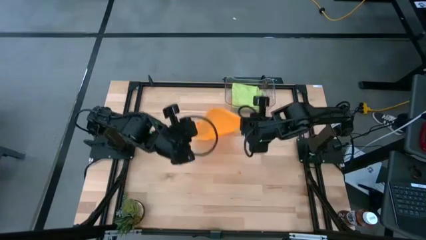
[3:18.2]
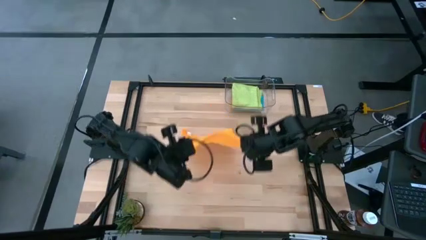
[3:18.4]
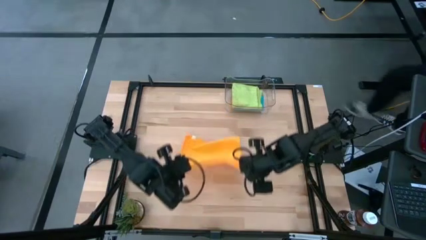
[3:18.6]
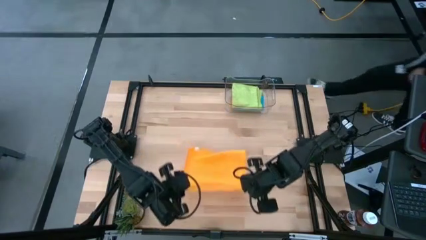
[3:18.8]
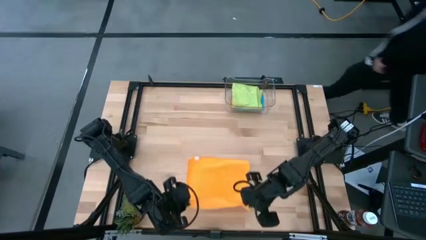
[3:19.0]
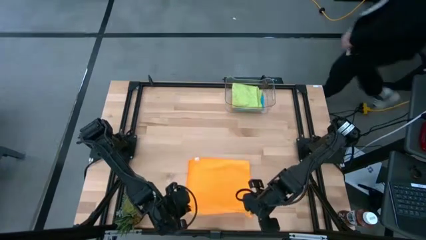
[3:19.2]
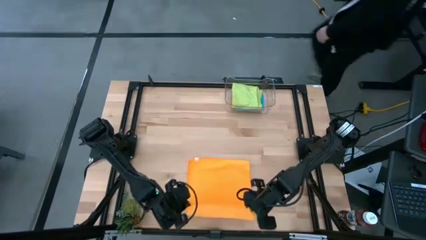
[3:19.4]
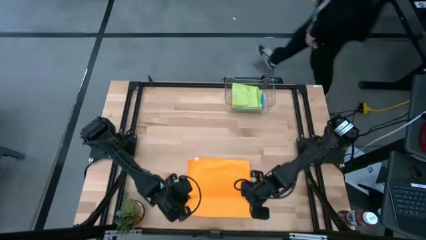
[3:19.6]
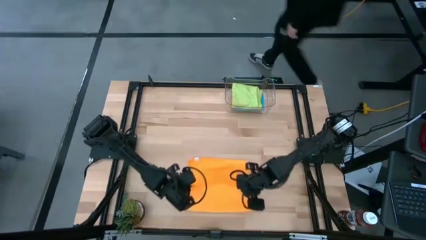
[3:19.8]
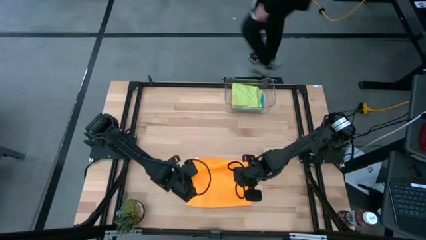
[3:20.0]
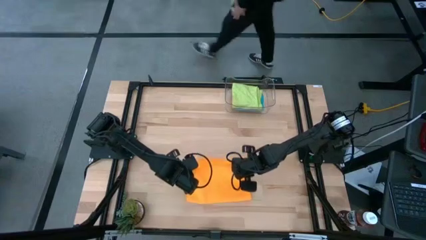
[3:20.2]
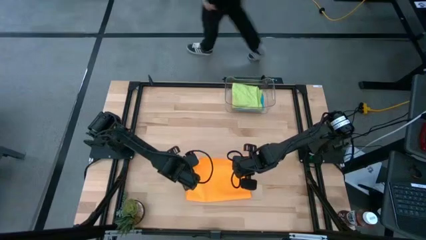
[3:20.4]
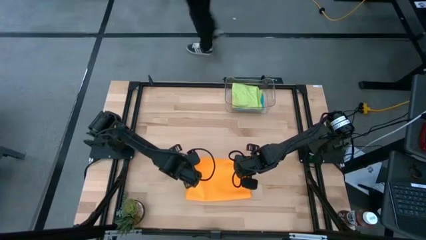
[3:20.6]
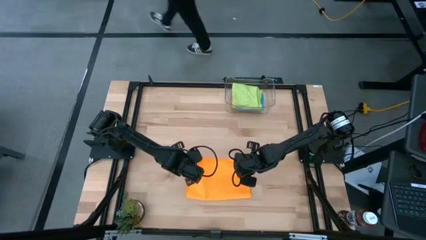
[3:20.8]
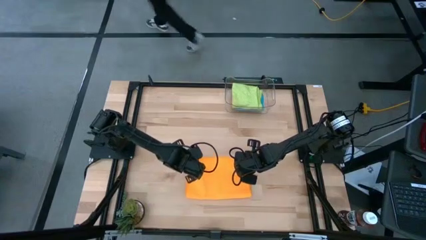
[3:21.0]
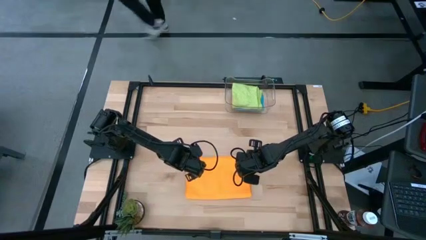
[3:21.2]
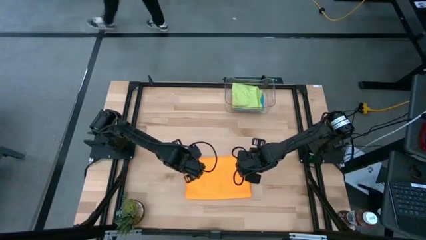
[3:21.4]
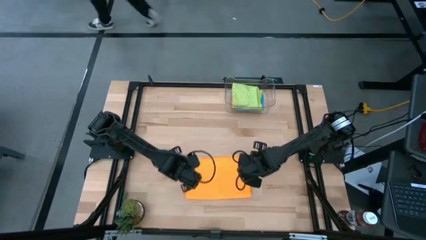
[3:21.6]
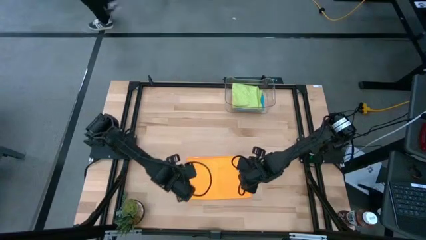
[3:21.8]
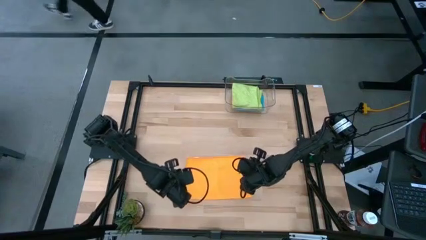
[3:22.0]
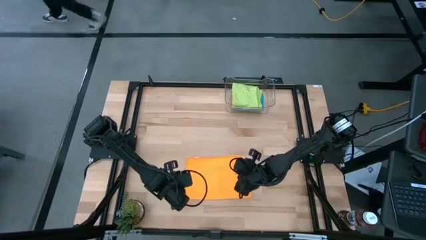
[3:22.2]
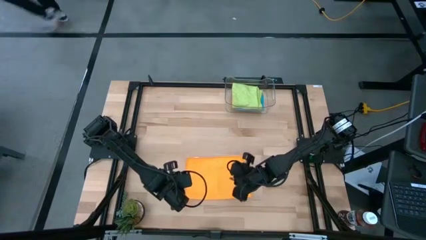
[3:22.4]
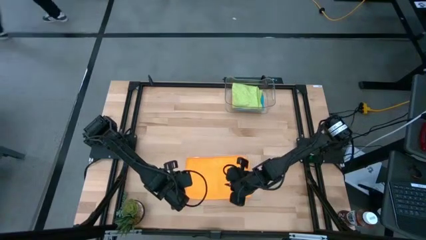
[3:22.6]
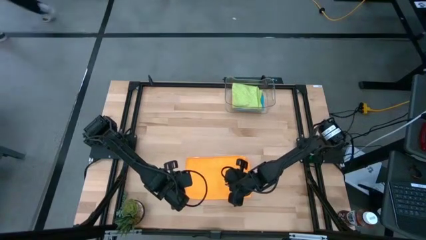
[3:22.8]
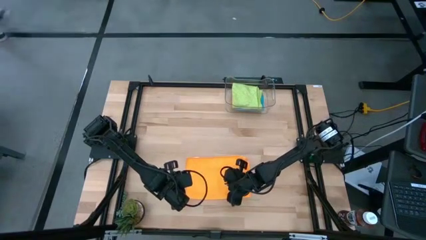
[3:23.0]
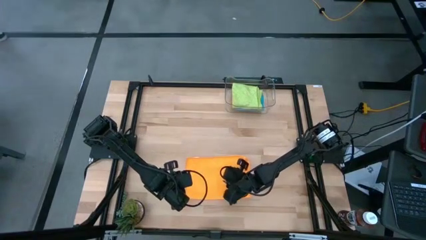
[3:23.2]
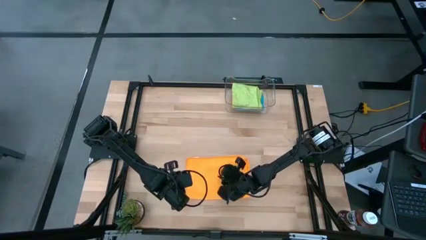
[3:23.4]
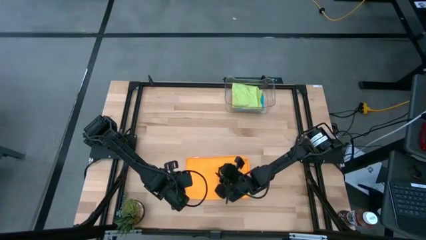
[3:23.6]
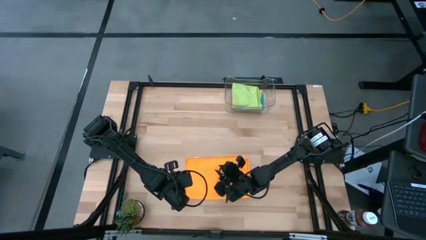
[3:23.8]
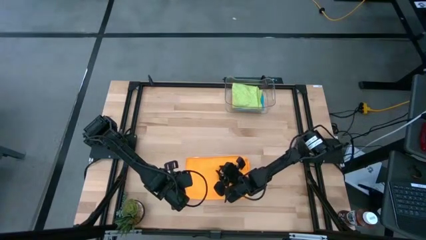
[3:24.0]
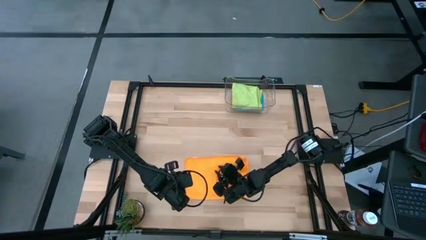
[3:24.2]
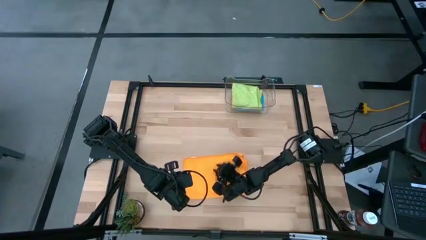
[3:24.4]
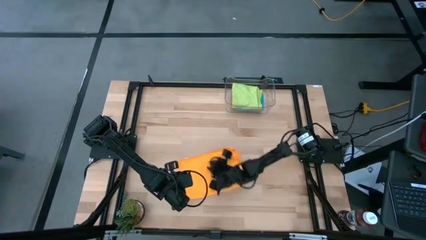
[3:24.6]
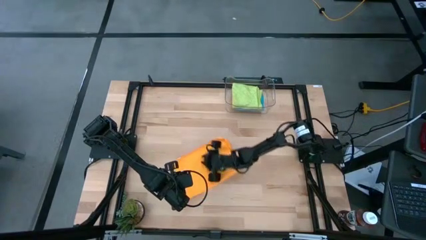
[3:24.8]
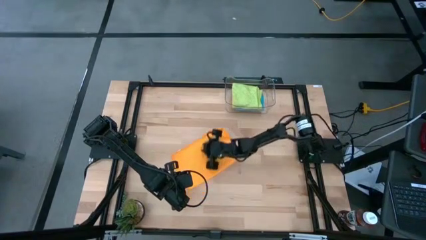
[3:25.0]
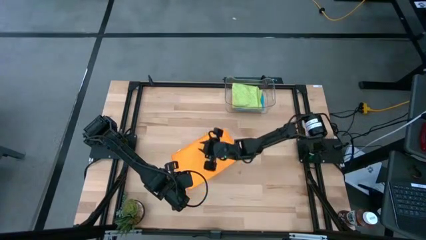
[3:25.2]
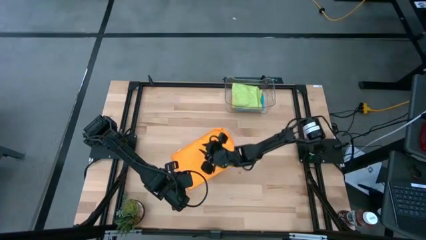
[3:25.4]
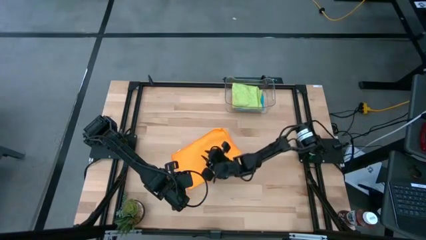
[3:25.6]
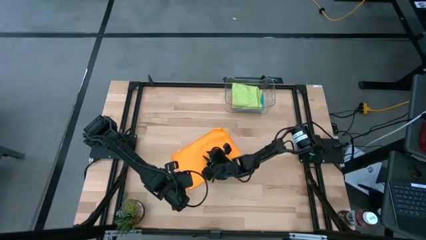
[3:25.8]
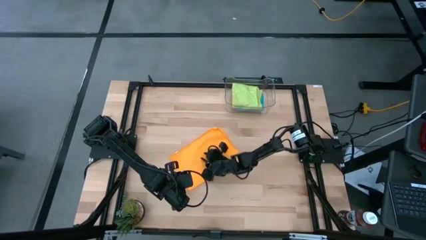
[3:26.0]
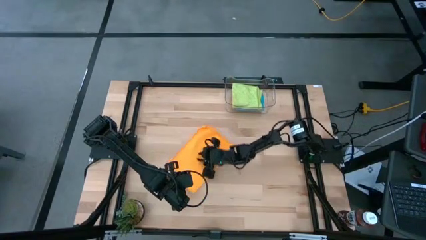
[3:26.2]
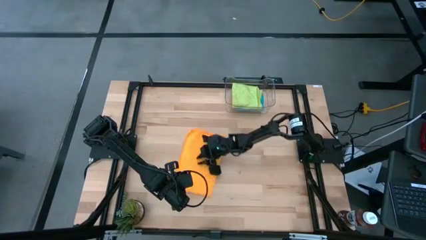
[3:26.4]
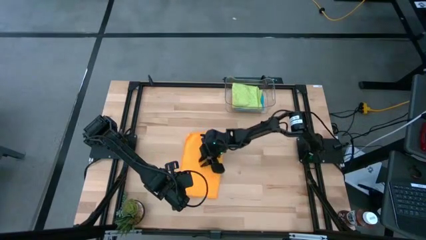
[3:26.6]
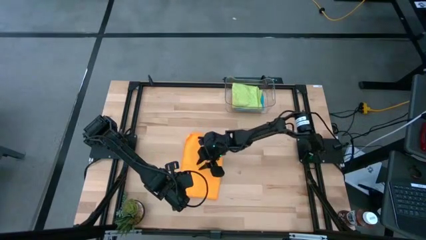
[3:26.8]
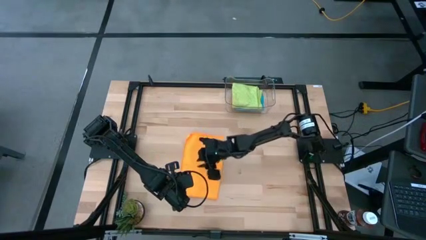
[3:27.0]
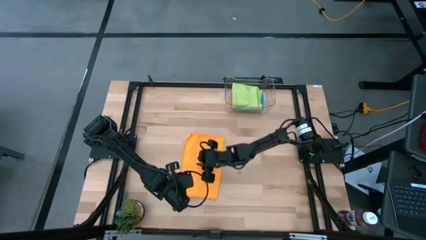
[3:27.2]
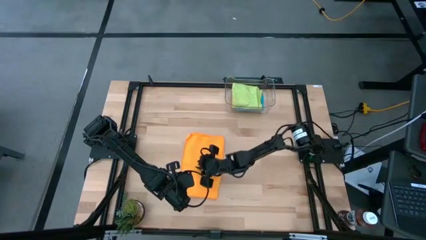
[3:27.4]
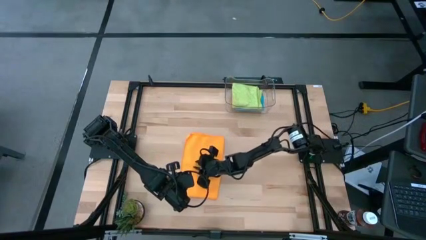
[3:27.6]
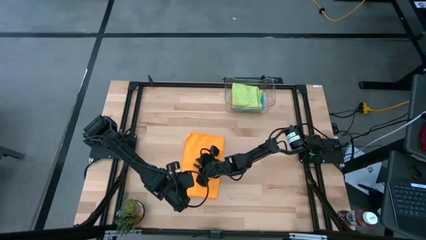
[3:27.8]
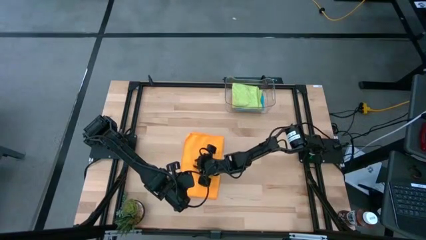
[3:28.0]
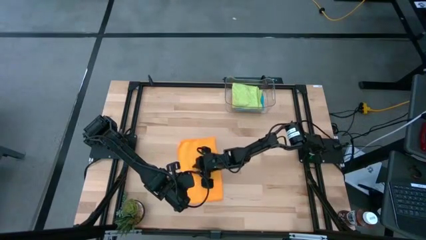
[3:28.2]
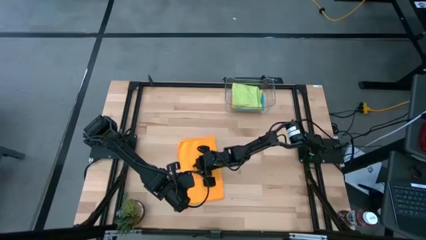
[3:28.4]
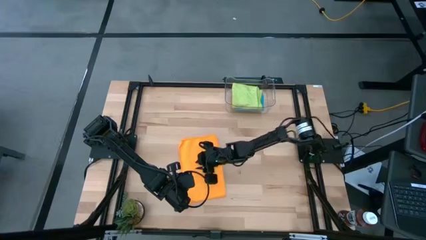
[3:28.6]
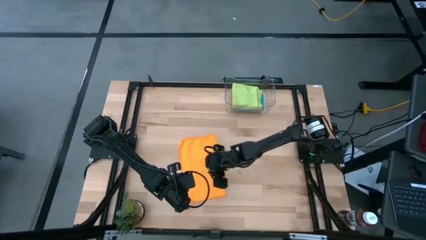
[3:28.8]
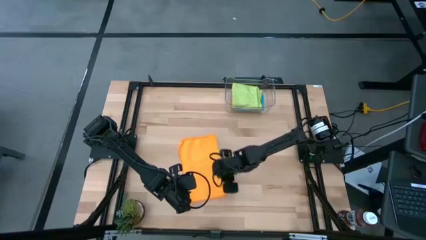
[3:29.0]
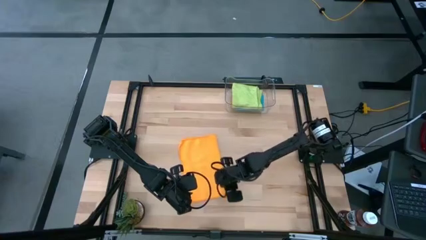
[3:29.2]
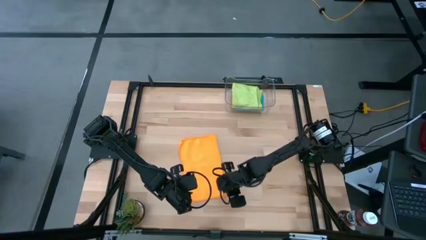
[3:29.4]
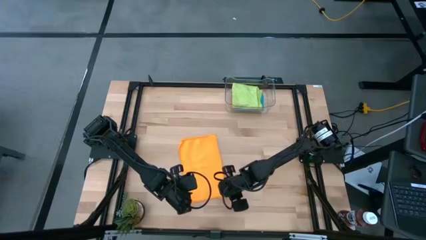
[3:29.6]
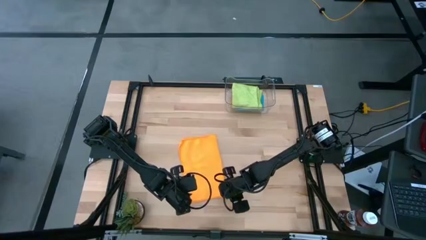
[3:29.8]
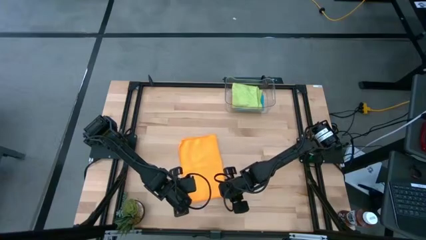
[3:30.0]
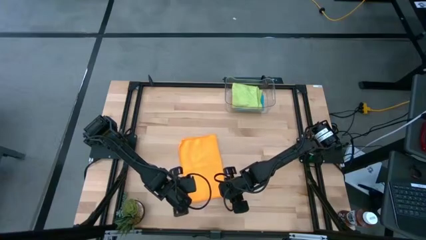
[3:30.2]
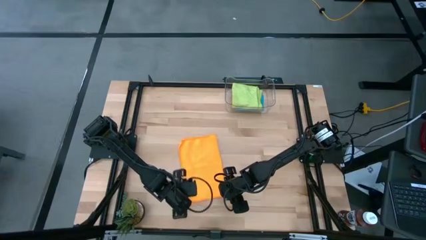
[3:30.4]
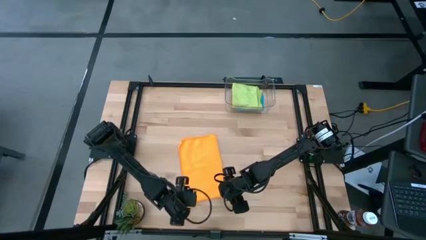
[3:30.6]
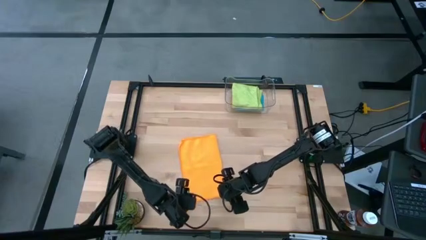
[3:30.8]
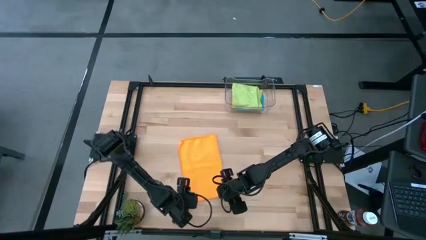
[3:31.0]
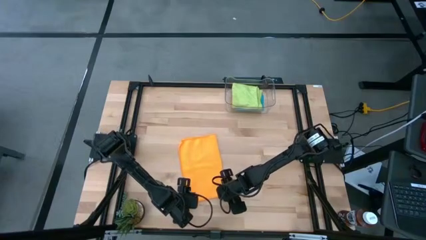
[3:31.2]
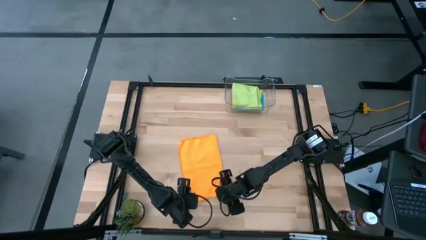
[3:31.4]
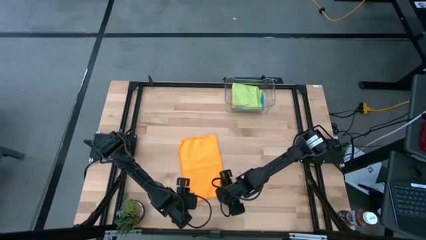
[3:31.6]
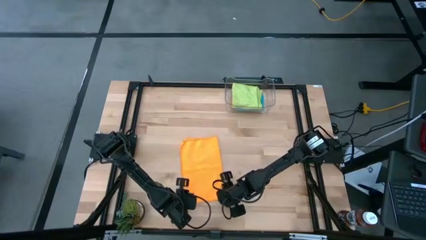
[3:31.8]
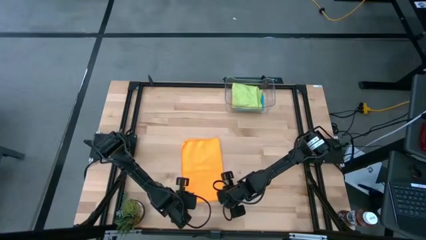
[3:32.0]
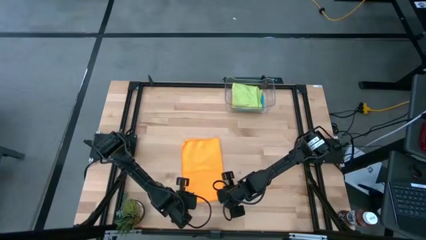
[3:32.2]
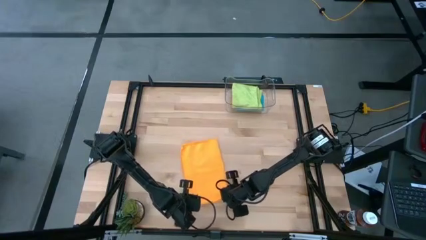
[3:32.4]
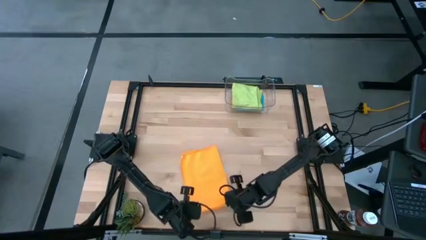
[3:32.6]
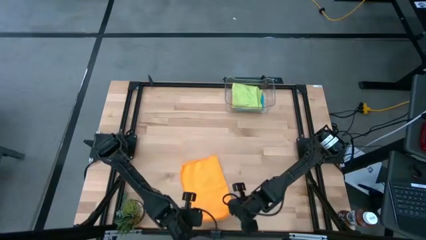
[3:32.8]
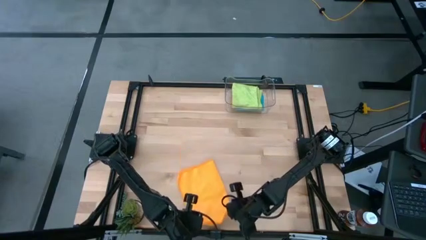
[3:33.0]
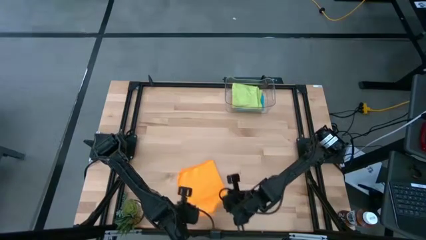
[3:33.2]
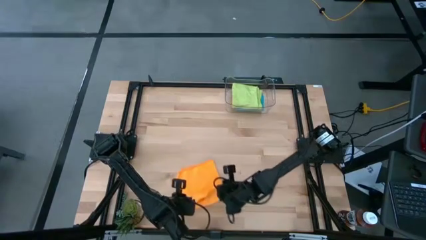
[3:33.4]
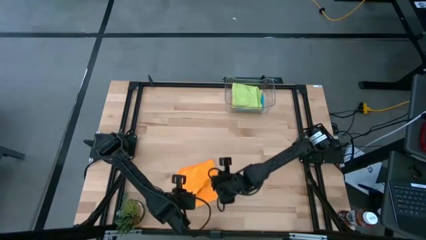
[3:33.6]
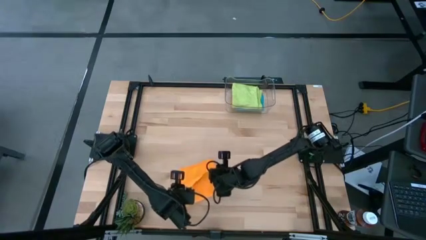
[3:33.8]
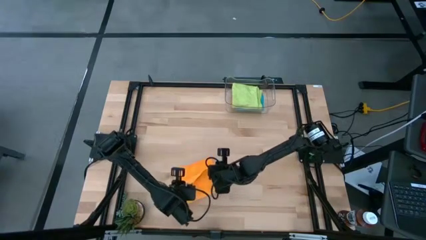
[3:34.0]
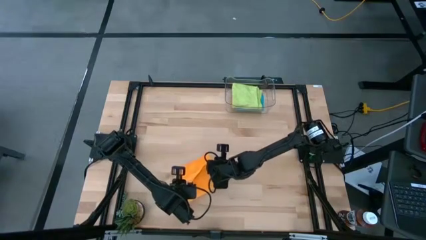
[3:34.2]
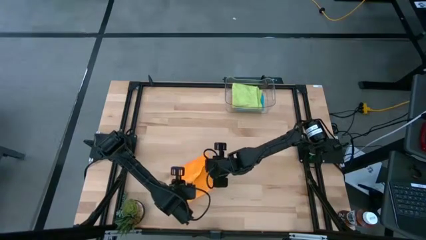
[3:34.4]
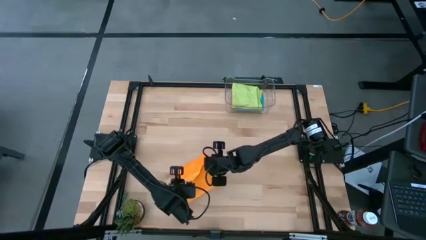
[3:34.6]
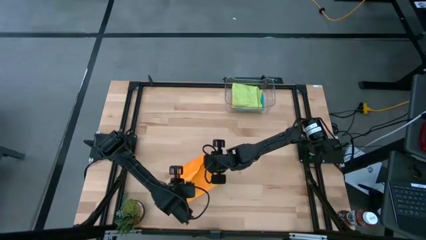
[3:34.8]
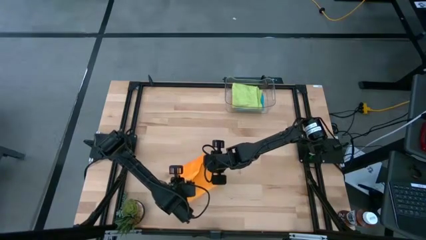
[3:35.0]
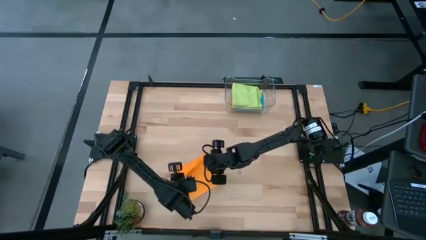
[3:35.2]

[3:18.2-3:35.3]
Task: Fold microfiber towels
Fold the yellow microfiber cloth
